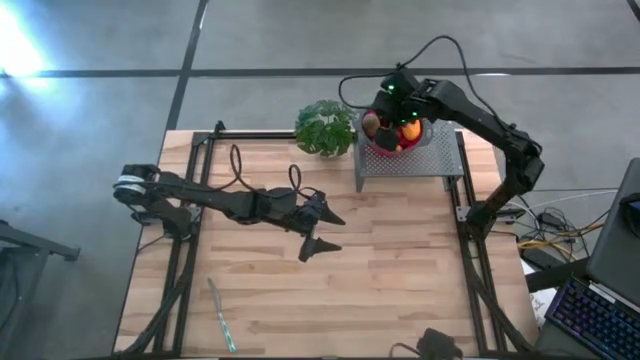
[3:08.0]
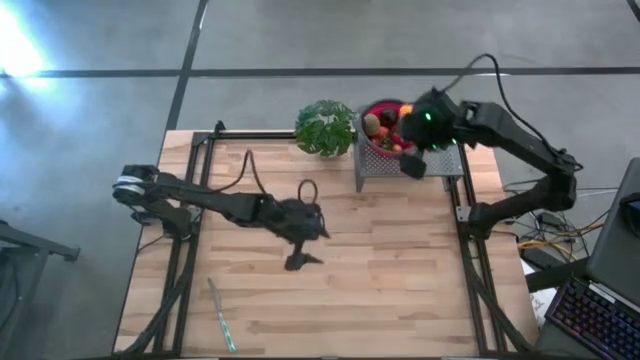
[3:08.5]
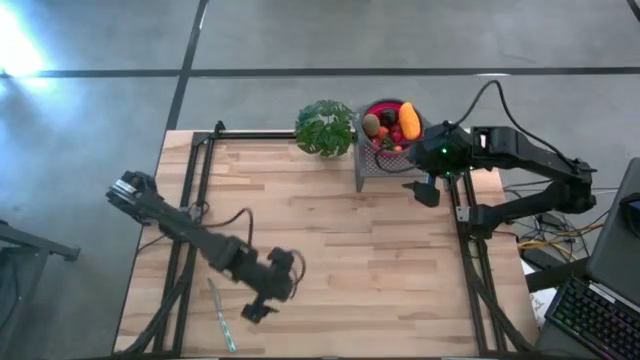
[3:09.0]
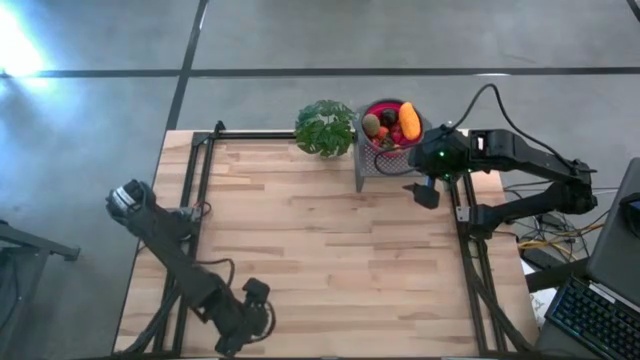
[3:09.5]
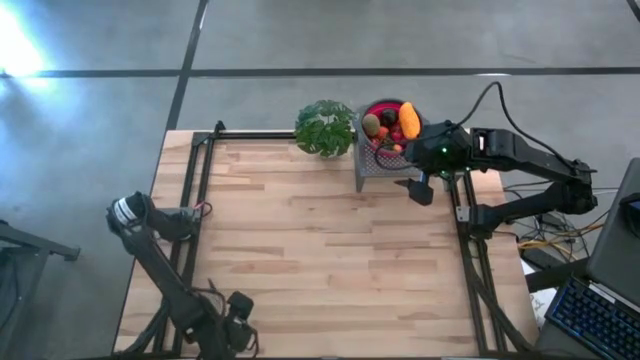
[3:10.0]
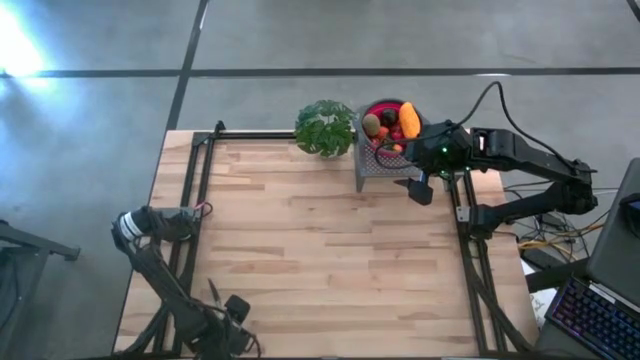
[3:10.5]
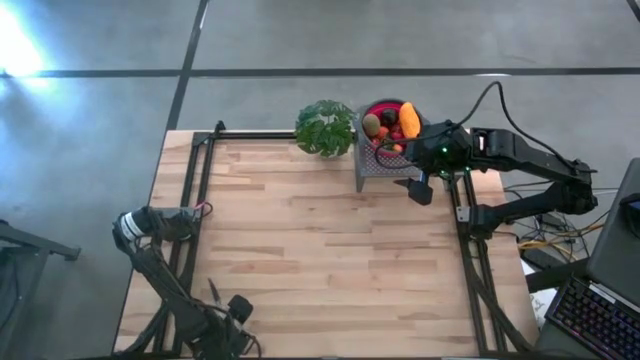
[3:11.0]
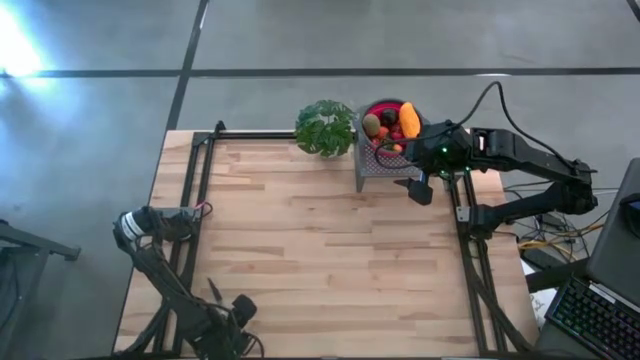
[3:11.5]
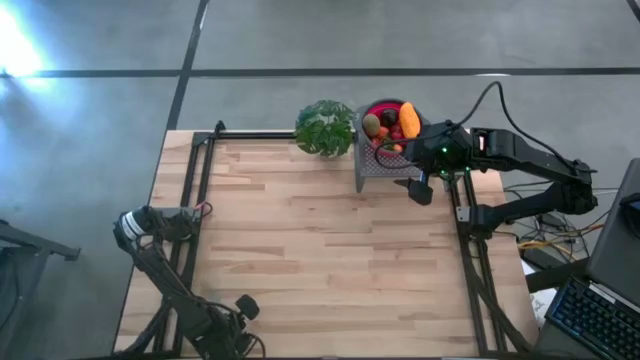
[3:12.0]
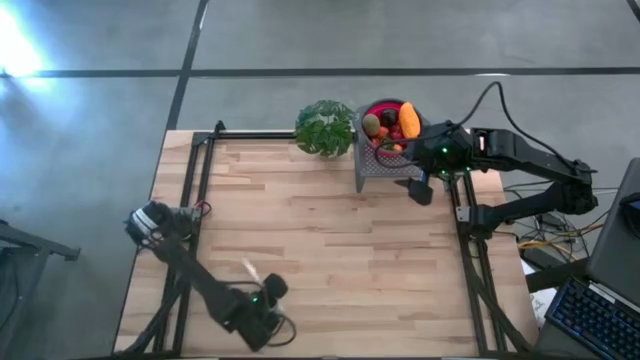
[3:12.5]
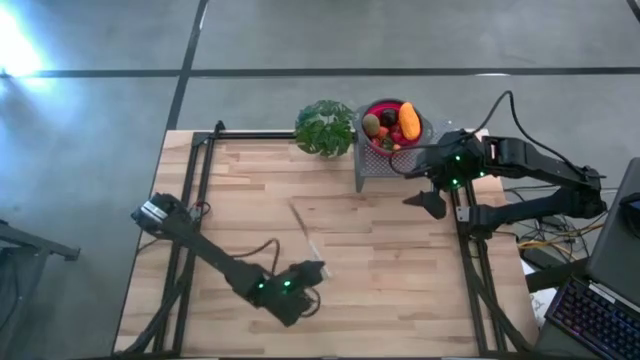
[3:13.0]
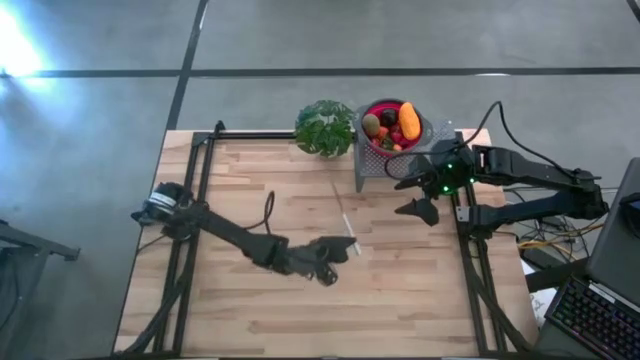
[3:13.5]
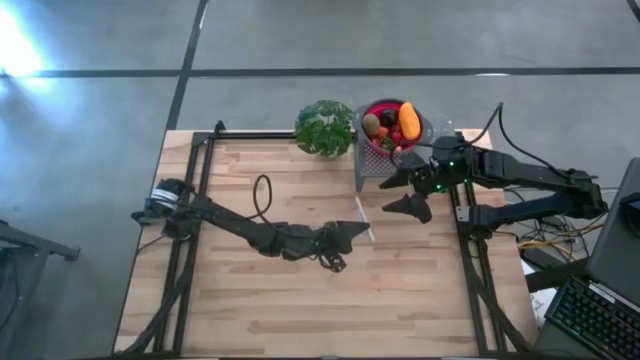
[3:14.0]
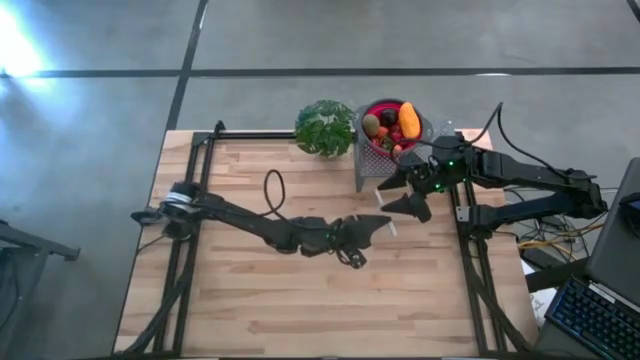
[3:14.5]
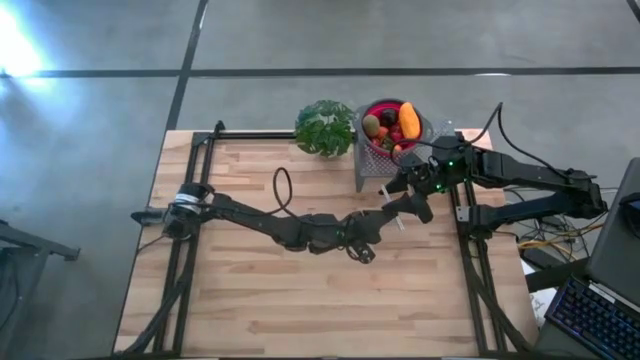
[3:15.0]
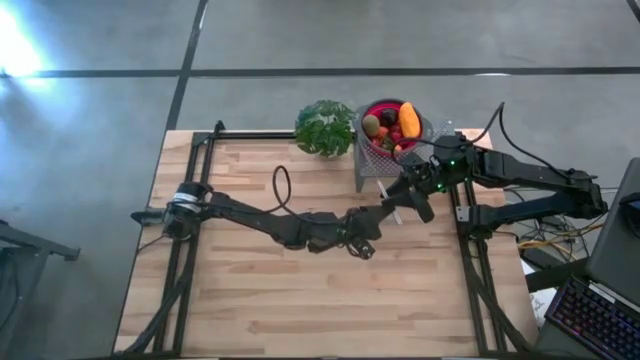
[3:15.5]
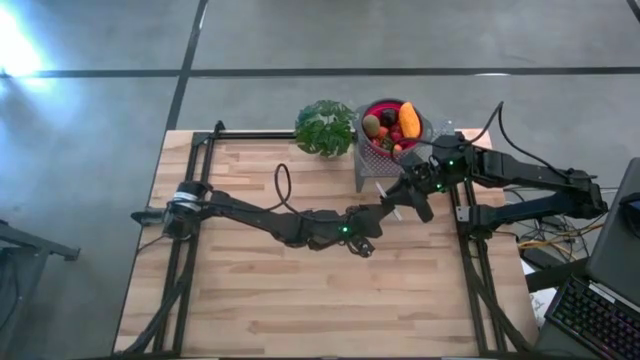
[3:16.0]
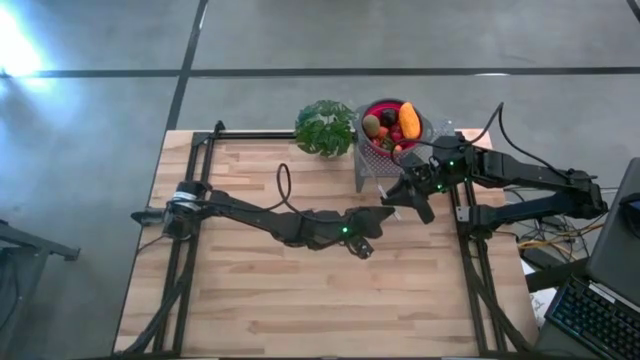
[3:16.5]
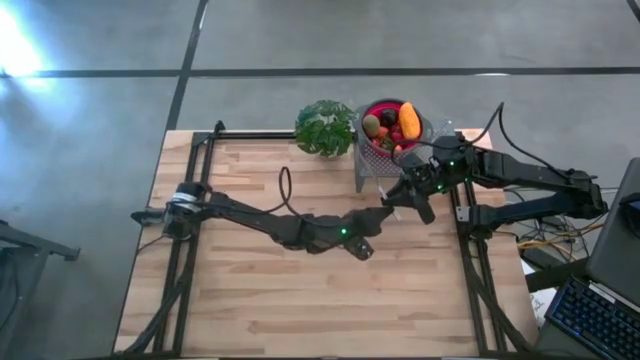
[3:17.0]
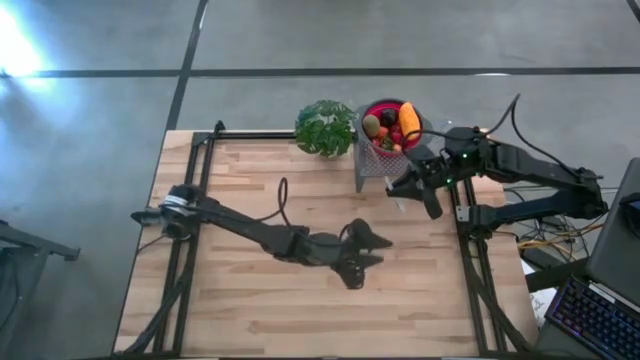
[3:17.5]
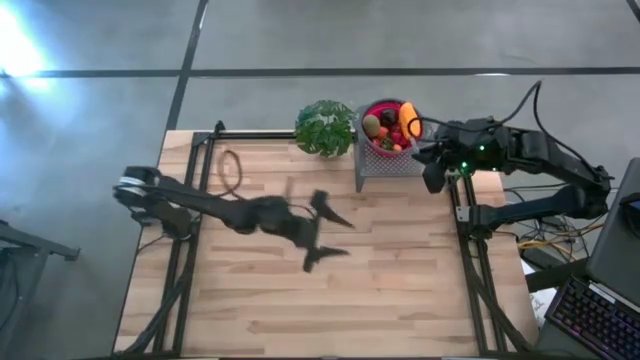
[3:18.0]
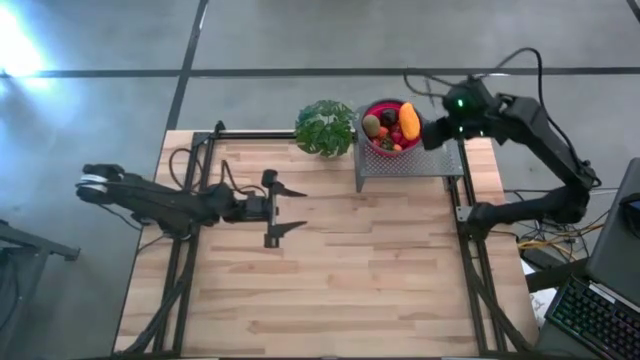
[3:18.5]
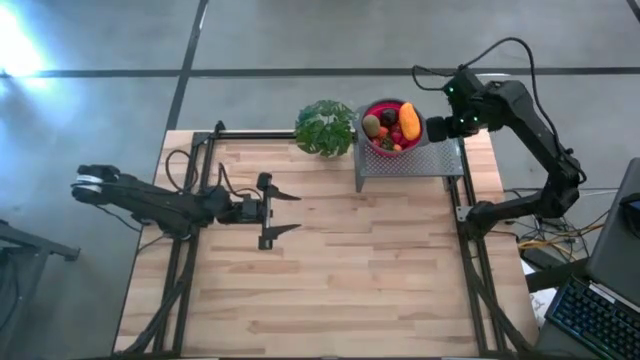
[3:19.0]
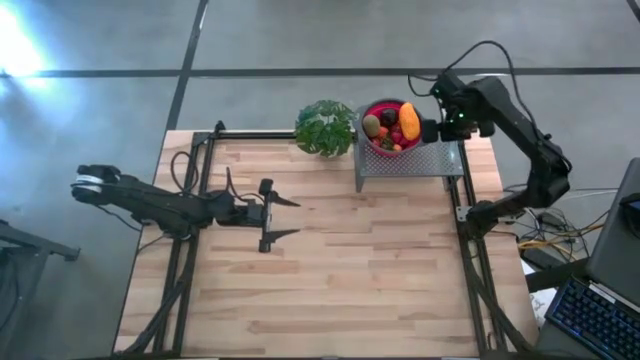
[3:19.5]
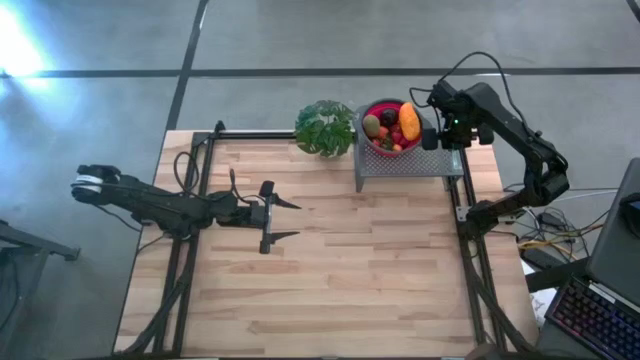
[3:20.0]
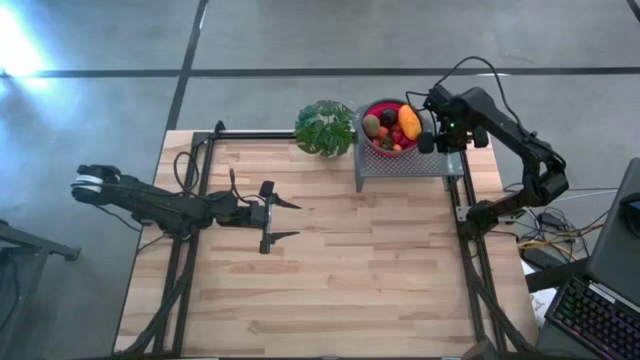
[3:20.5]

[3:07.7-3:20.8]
Task: Pick & Place Fruit
Put the blue knife on the shelf

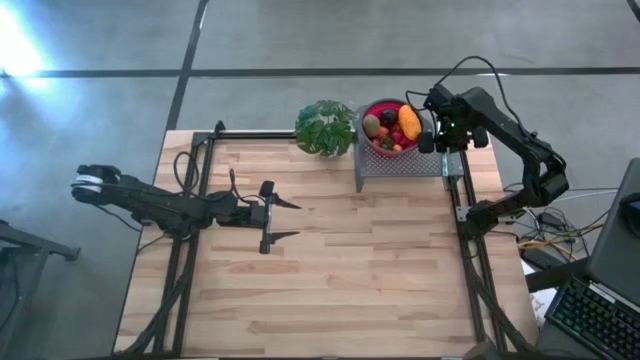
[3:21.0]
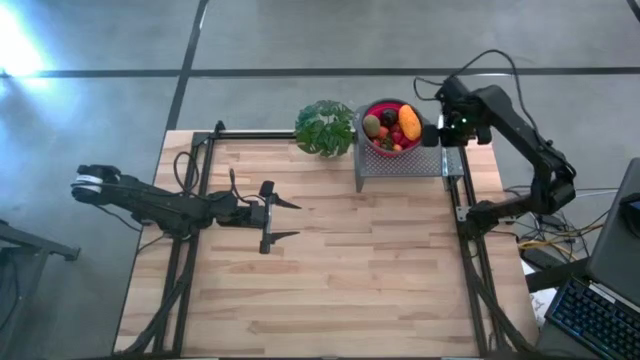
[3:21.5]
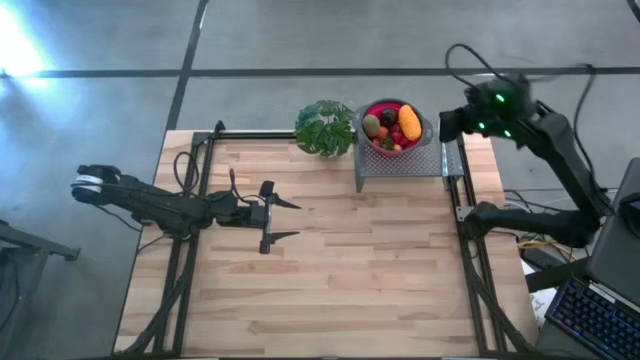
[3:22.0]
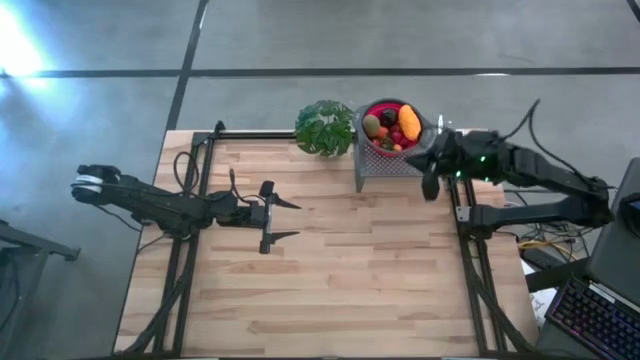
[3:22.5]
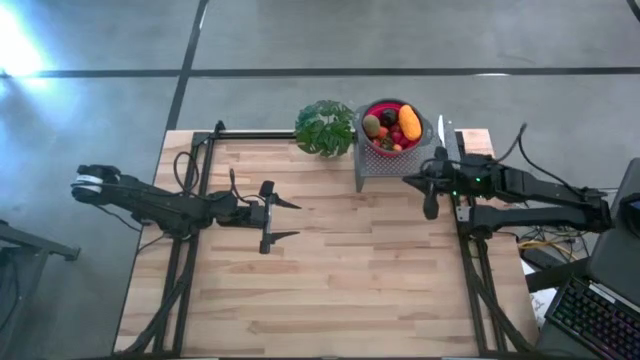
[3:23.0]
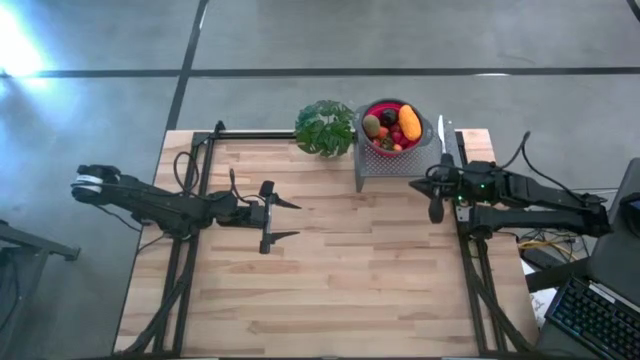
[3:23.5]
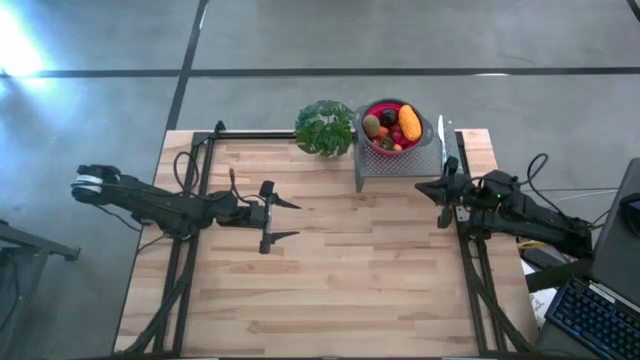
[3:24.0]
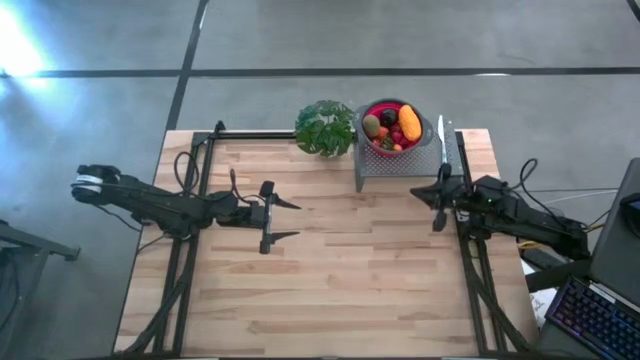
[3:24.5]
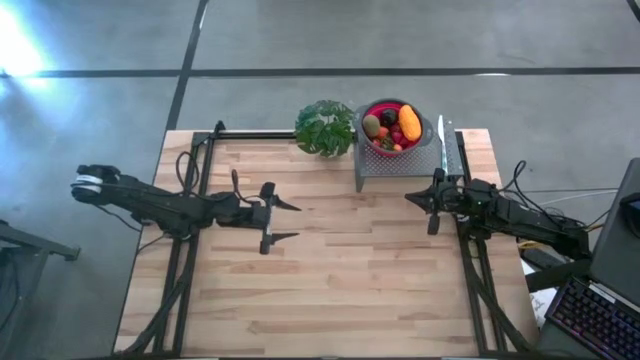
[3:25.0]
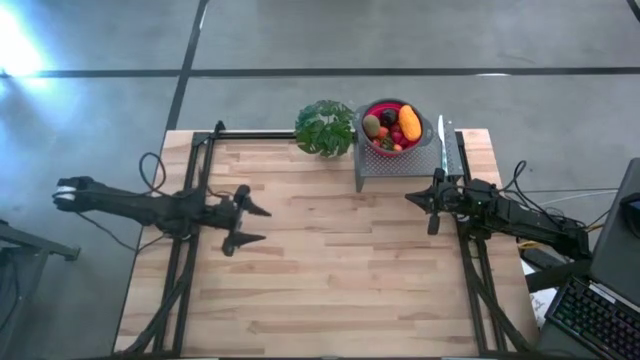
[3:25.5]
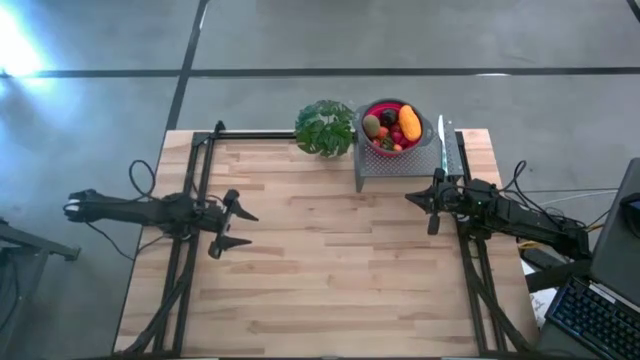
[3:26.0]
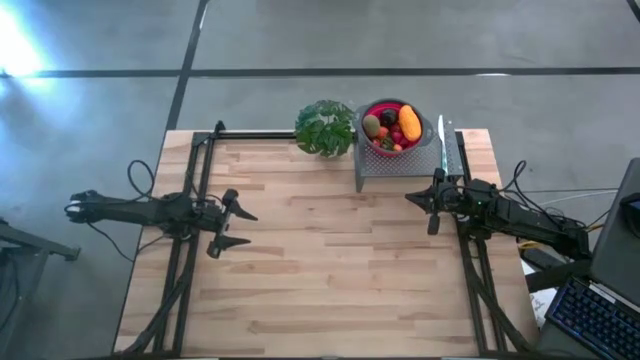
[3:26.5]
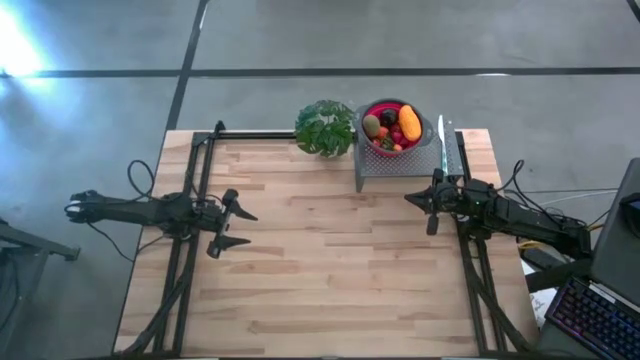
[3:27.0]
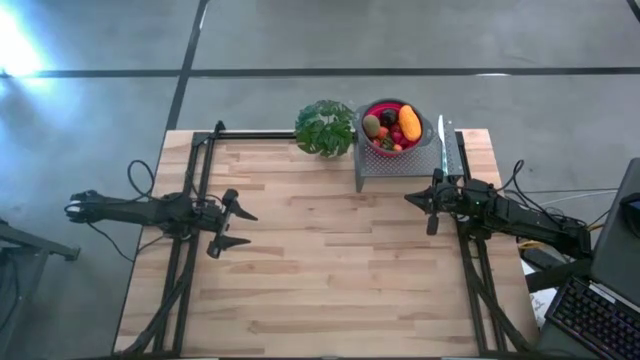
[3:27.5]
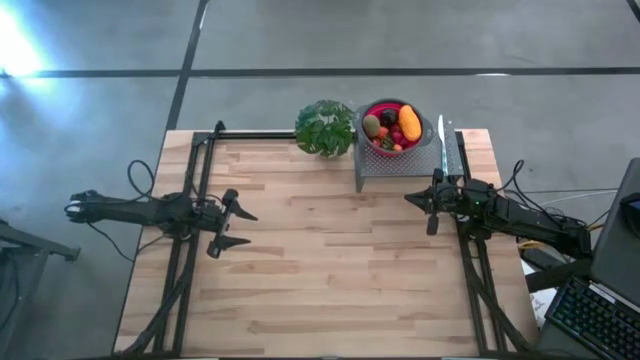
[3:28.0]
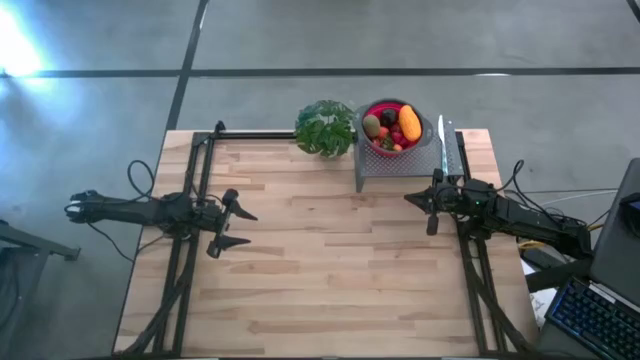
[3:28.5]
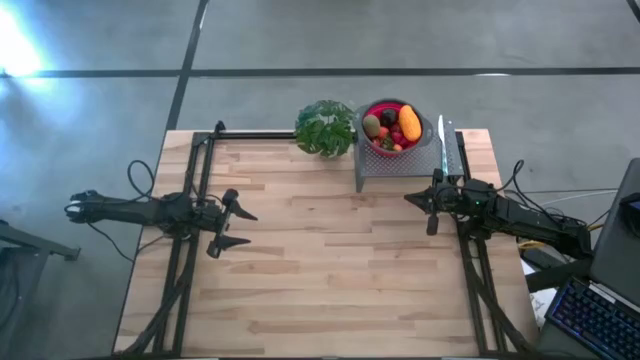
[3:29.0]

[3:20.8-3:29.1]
Return to Home Position
